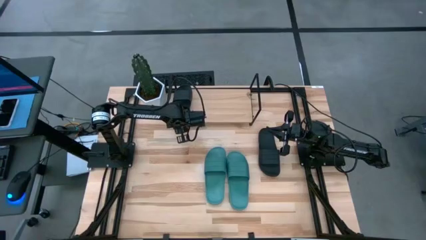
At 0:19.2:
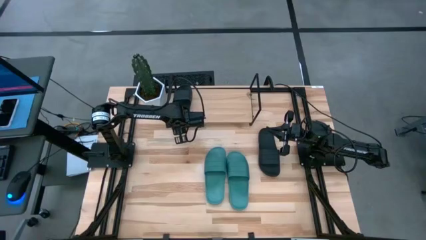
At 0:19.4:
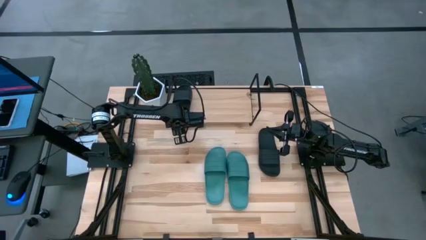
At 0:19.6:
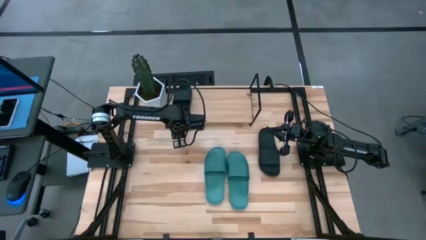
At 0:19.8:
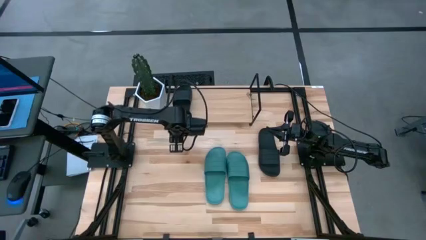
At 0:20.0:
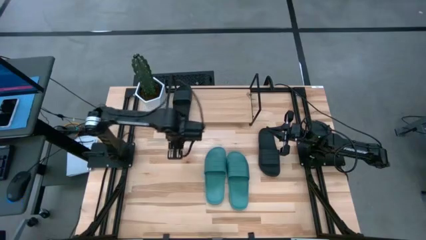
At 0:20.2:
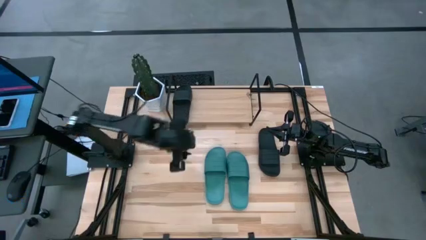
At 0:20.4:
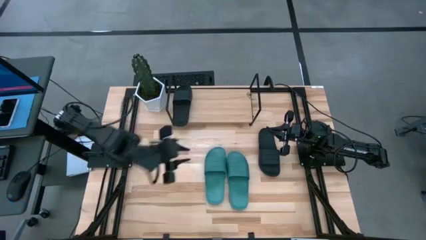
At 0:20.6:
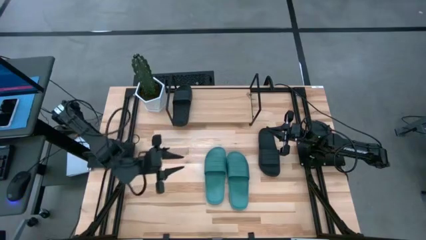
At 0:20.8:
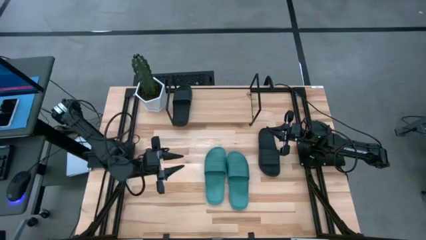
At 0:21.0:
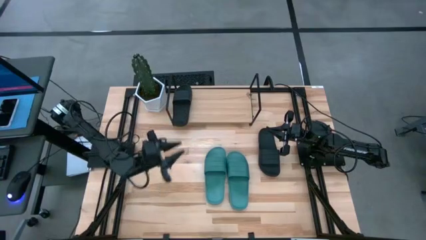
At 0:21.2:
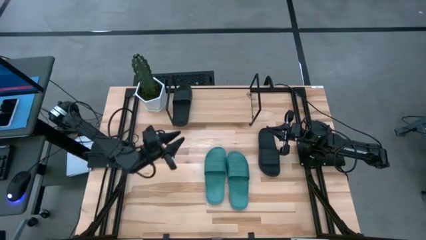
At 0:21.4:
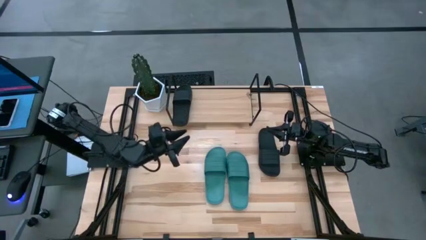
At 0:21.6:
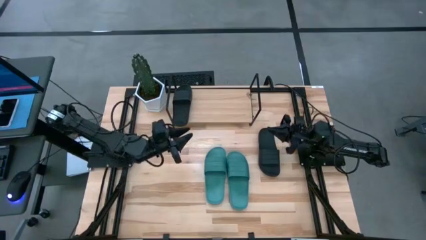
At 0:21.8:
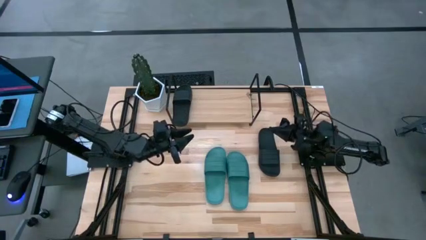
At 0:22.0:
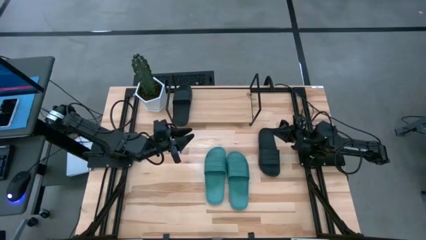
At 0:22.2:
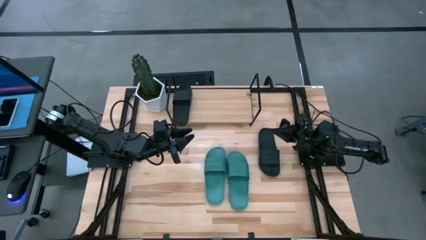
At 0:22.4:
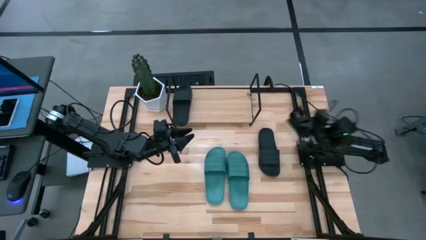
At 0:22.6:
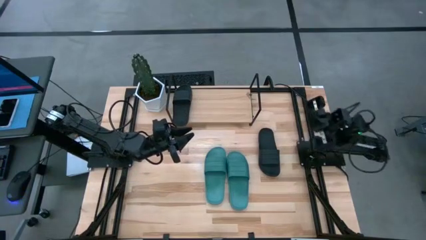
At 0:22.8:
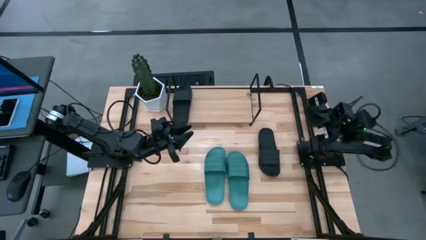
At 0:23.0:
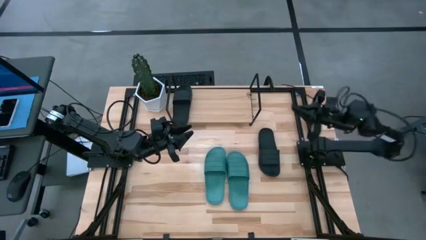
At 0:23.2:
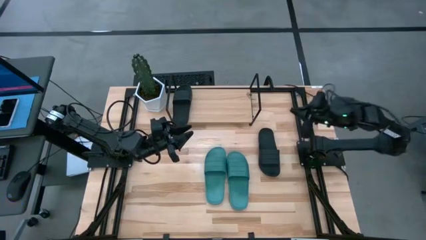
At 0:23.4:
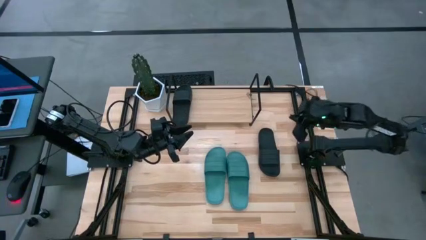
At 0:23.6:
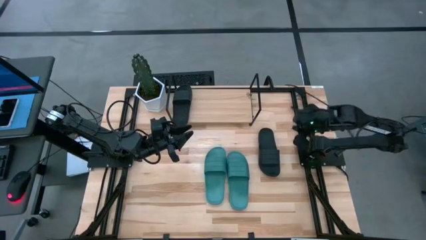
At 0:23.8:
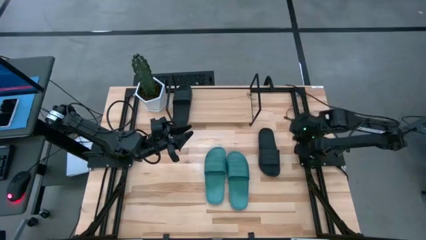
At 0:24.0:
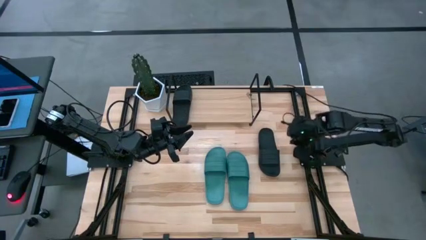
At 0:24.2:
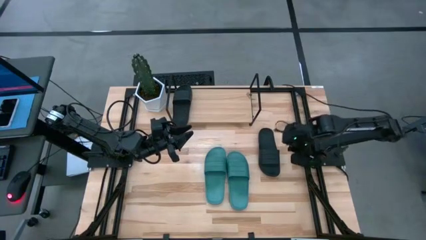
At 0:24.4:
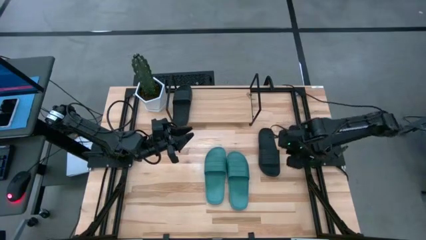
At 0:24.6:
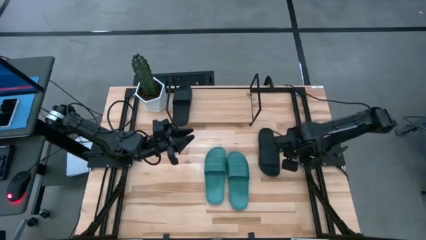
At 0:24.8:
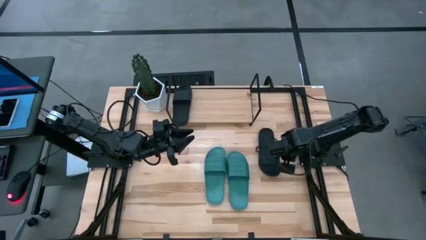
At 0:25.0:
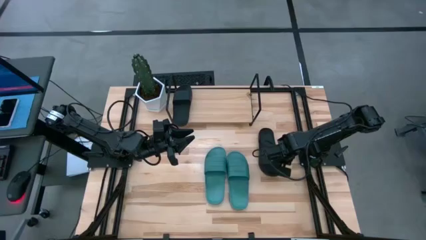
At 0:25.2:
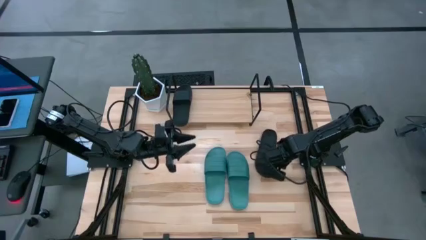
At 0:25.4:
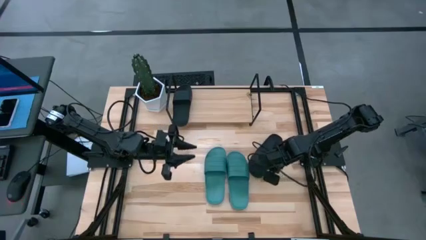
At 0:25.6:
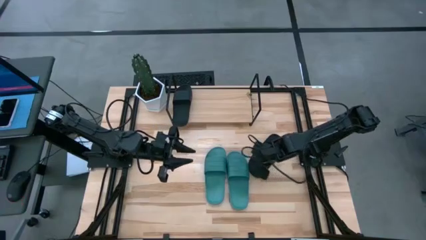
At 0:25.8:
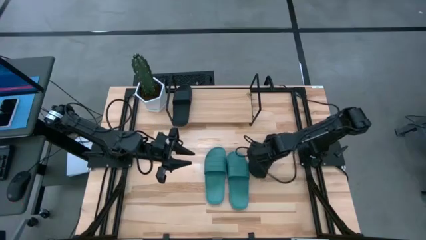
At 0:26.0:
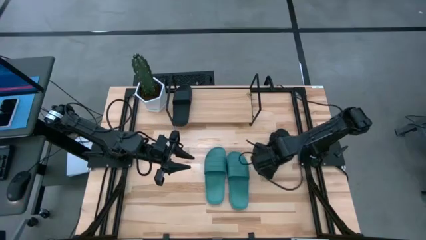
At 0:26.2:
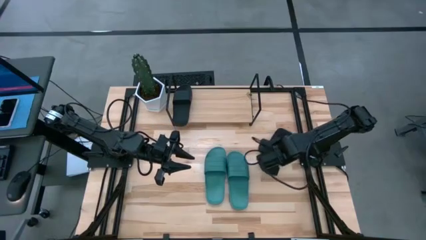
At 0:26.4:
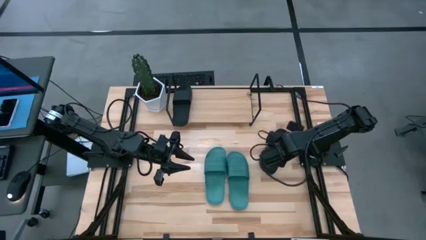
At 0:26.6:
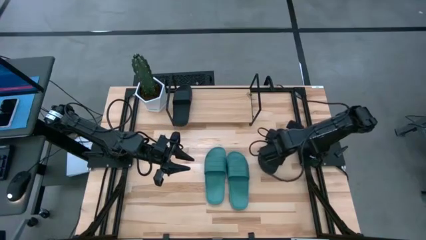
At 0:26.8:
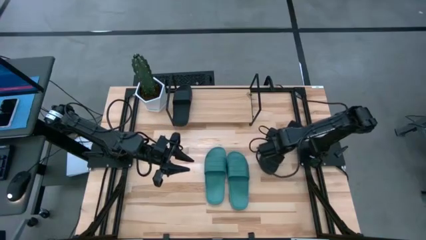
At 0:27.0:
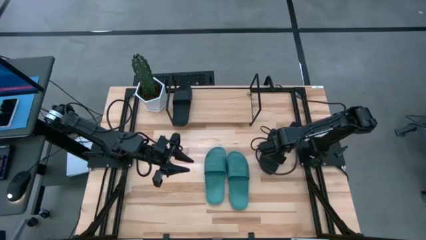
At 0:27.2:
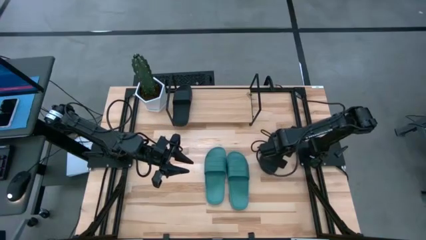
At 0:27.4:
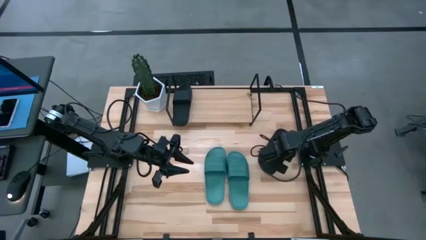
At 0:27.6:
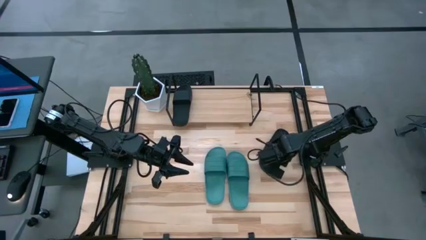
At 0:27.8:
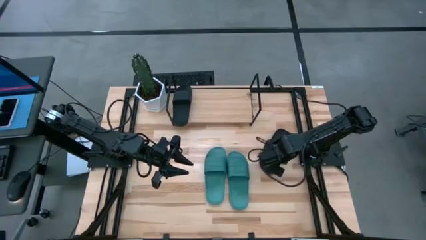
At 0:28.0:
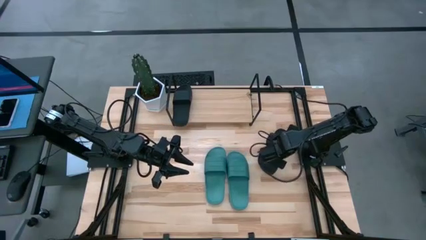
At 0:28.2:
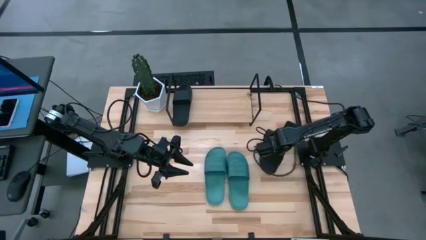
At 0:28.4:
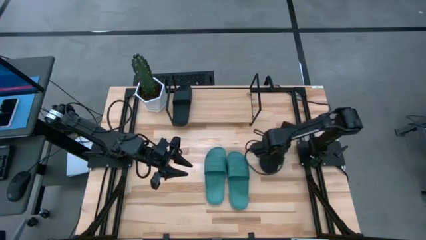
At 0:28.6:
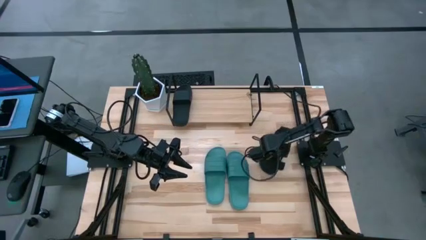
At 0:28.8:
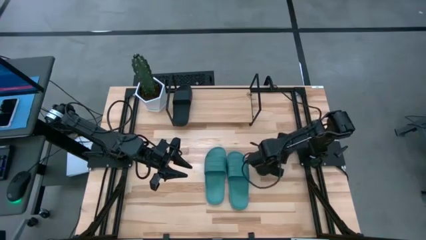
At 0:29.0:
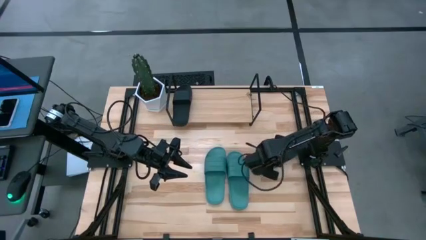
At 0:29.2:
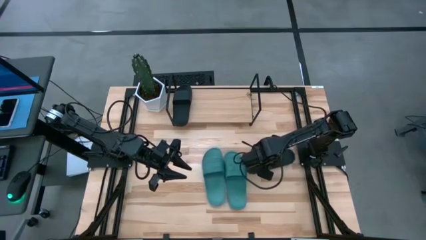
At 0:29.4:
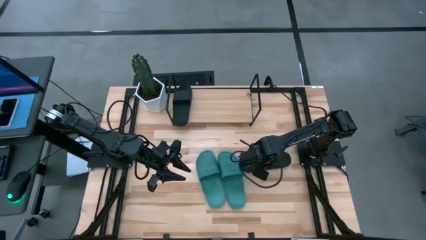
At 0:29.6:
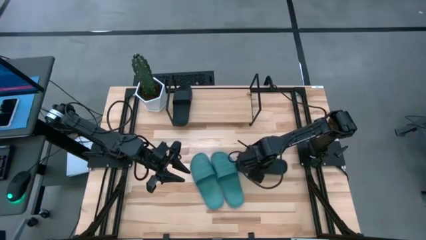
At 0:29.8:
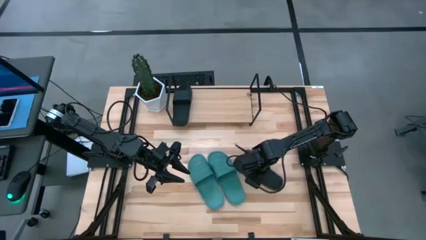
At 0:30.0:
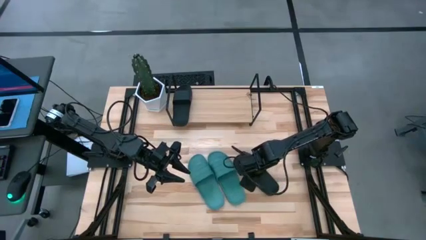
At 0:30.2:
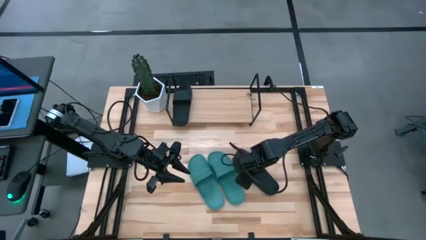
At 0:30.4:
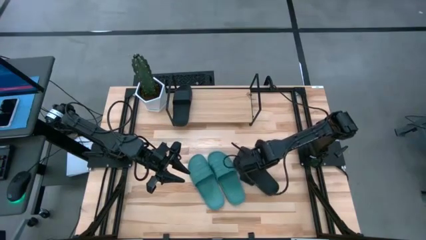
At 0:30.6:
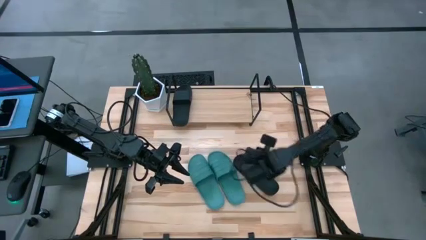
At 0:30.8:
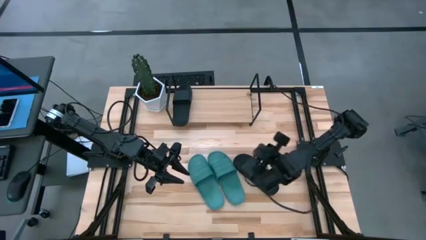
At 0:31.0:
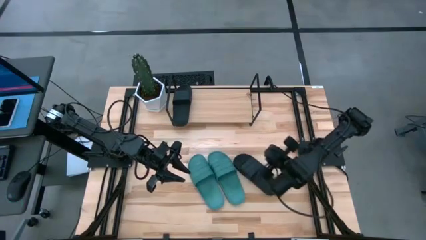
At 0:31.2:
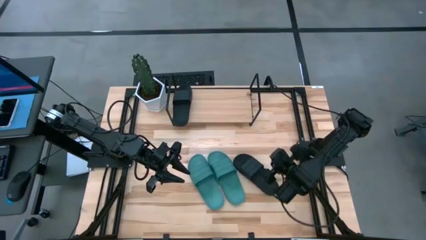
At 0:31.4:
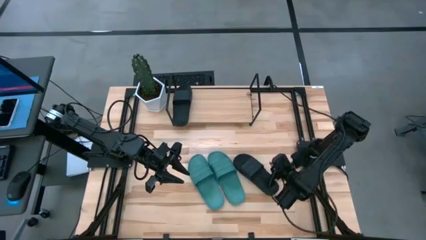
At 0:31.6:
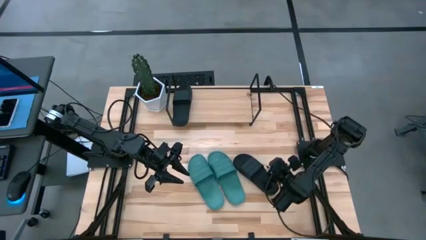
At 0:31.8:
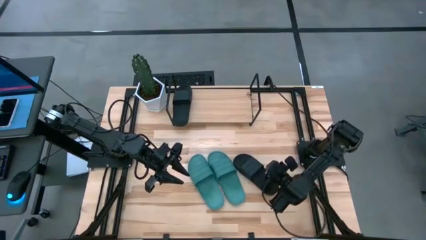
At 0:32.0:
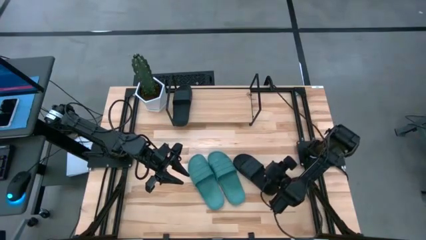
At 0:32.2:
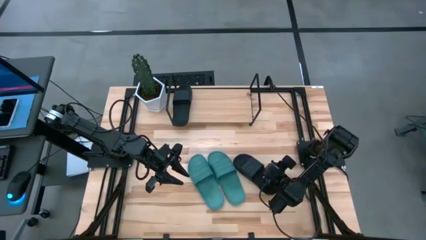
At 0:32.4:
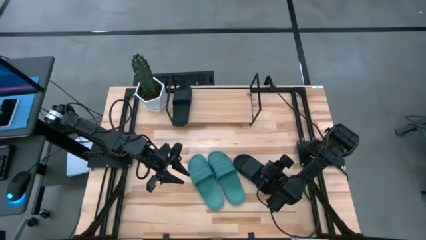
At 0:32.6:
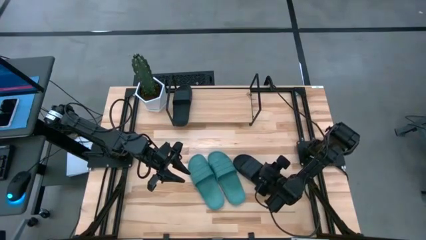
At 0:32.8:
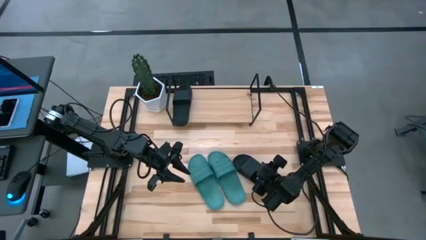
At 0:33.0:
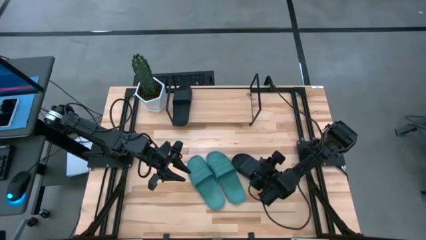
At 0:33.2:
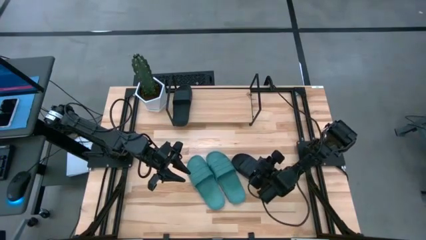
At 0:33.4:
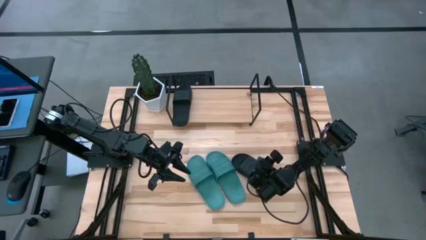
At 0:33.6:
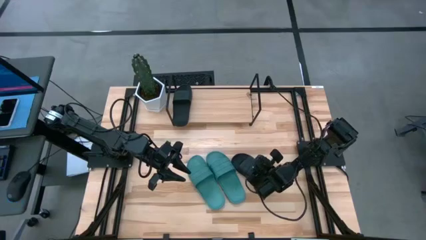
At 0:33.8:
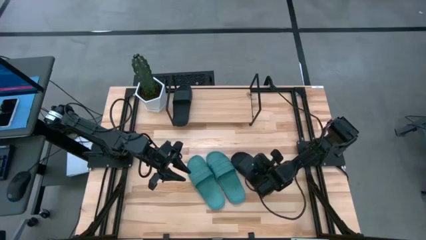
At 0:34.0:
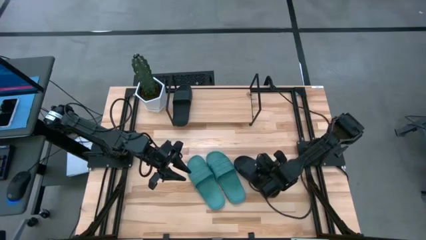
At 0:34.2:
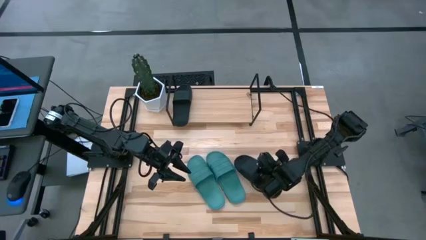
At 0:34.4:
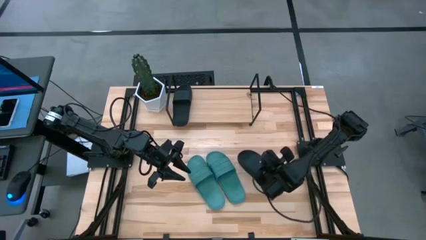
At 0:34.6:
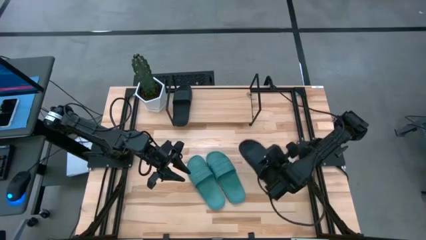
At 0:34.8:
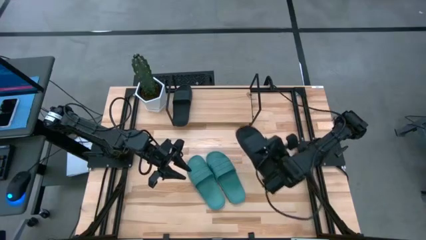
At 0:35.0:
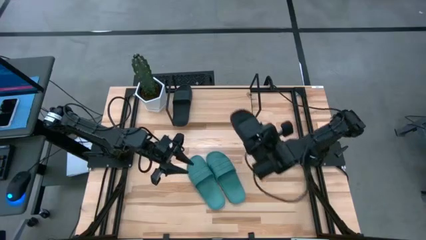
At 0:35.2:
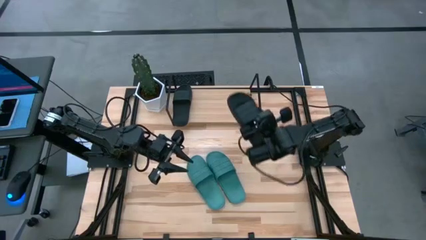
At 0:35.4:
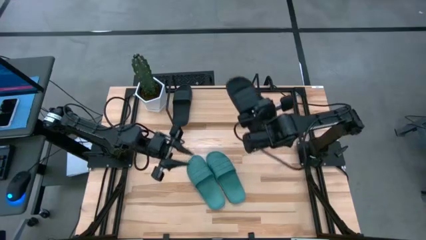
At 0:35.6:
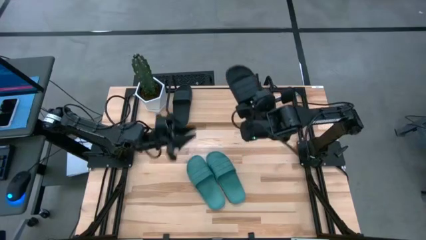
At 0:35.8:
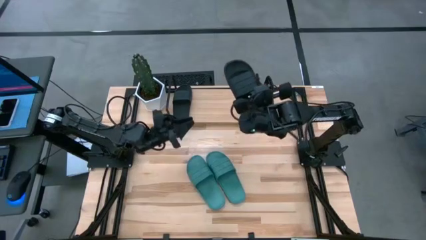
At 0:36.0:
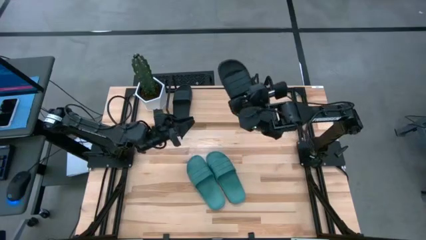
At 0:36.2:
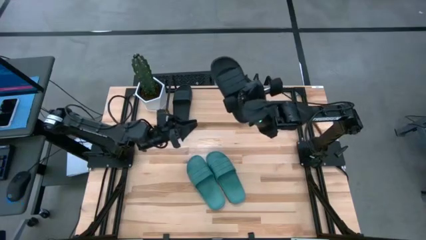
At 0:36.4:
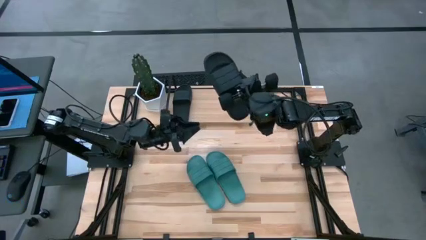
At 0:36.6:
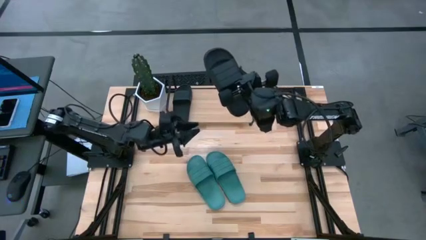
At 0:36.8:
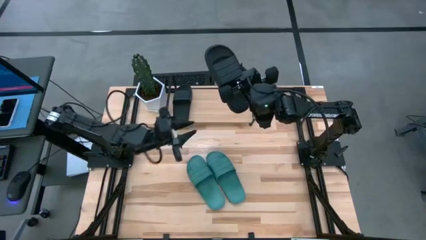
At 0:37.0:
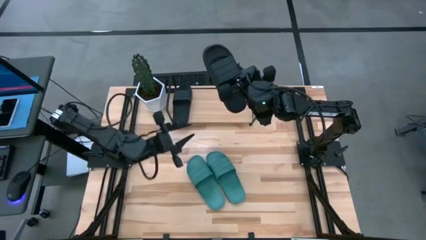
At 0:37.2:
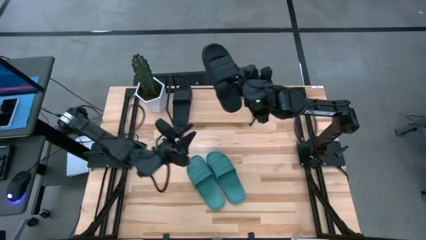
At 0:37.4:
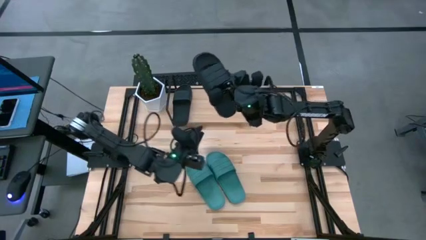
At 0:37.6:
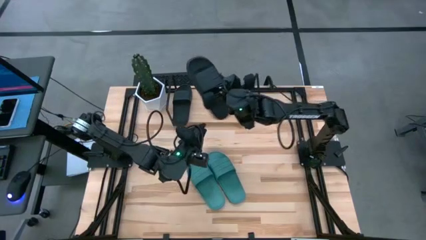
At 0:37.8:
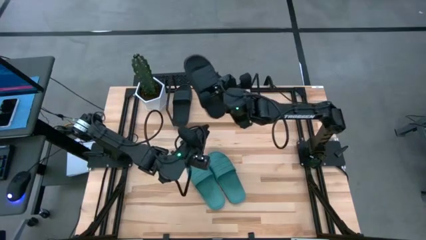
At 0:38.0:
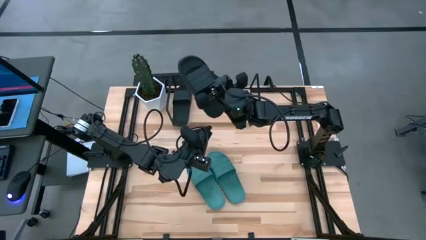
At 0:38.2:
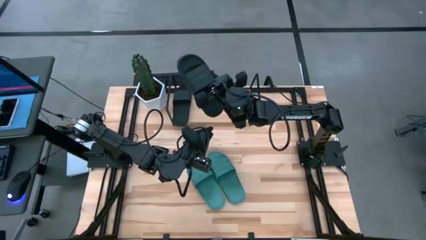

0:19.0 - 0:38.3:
Task: Pick and place slides into the shelf
Put the black slides on the shelf
